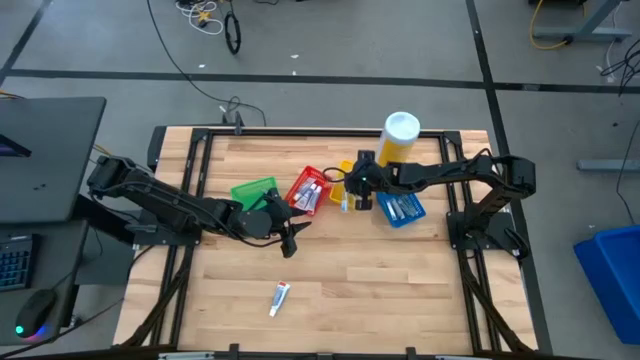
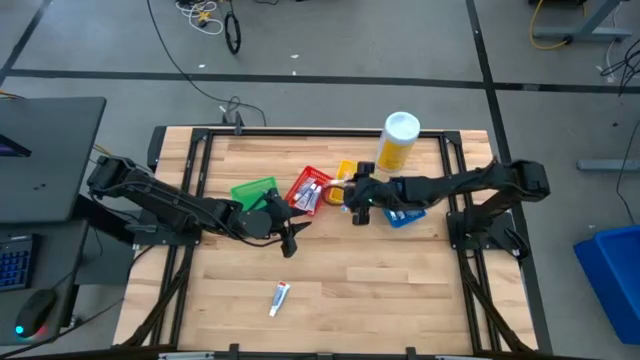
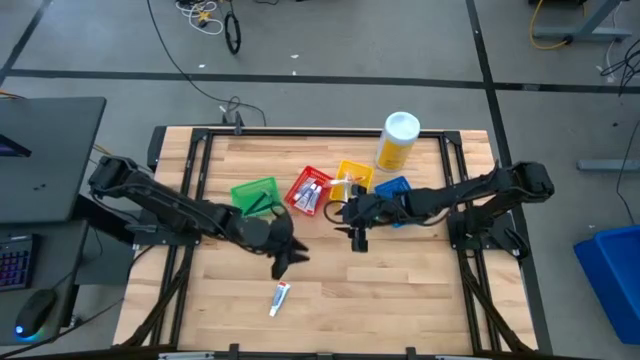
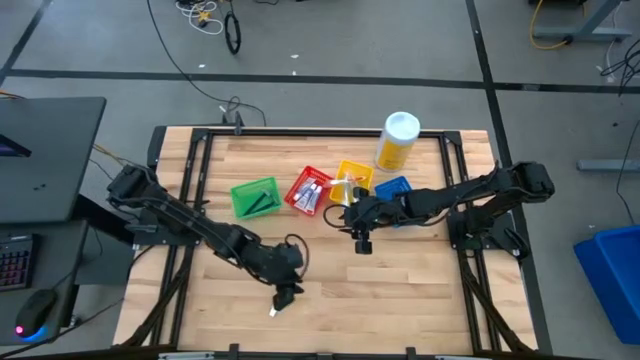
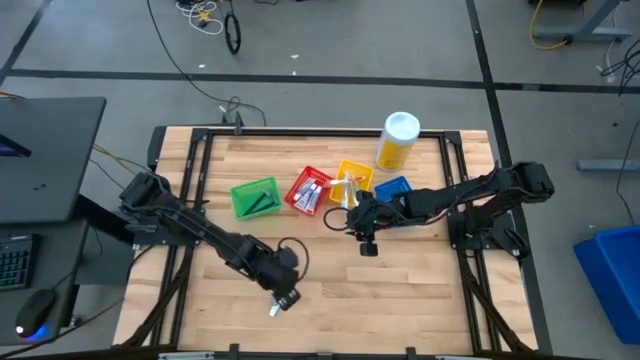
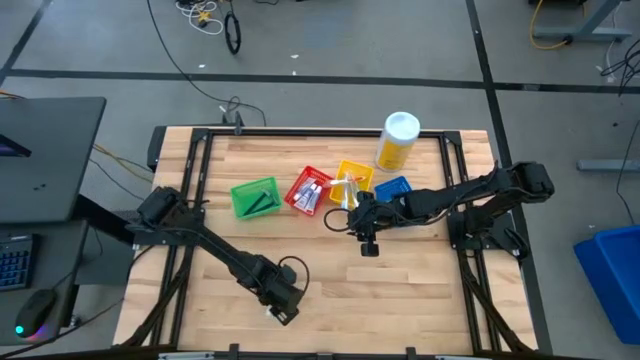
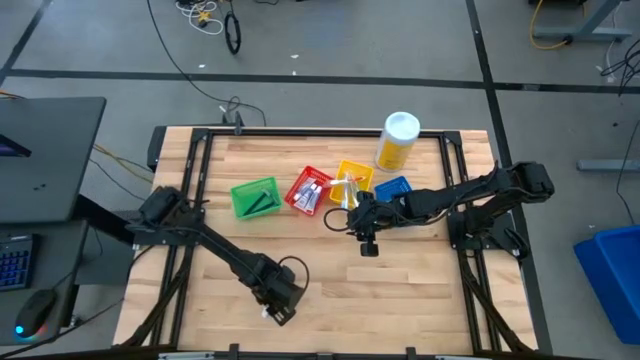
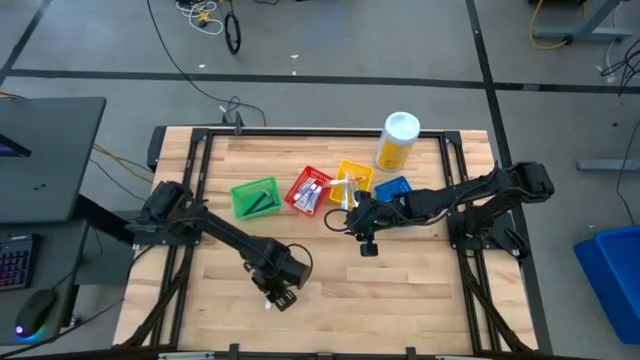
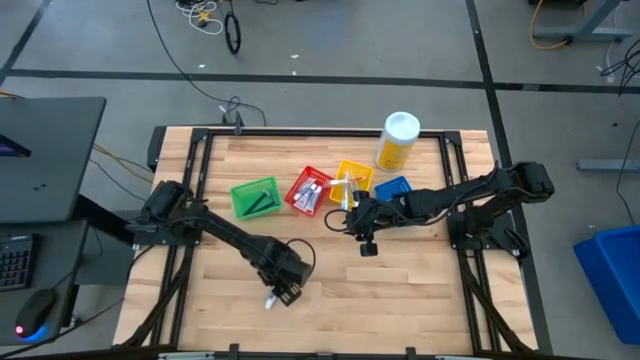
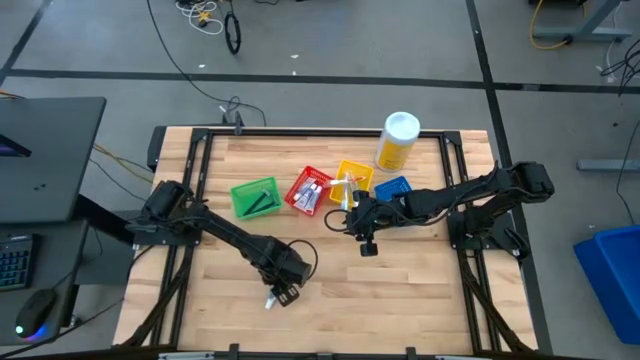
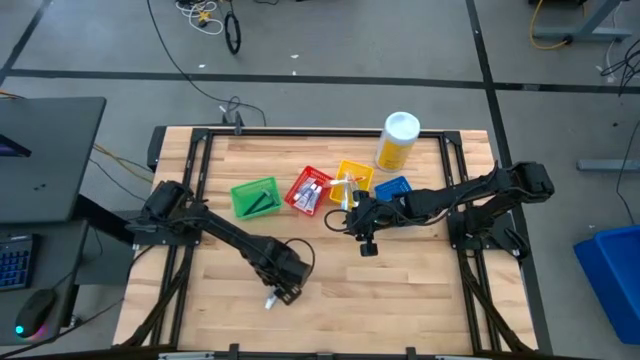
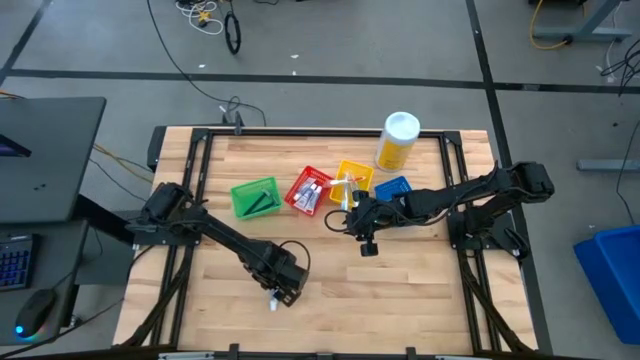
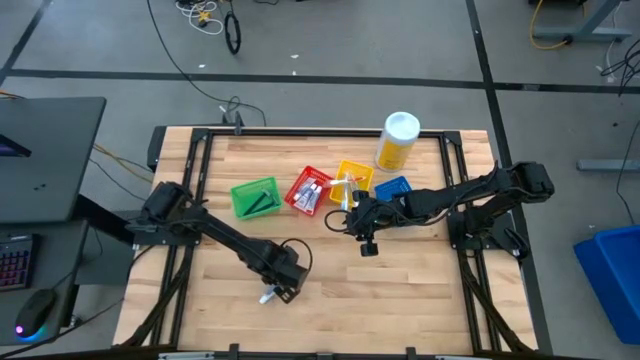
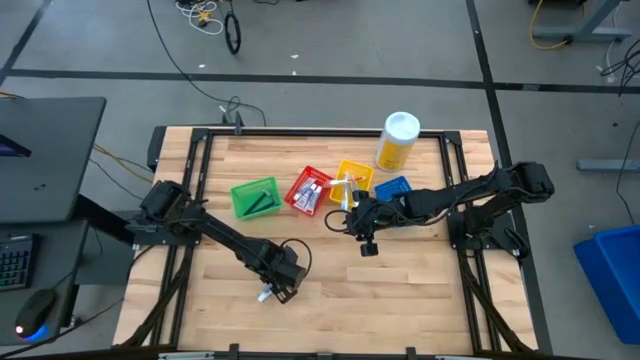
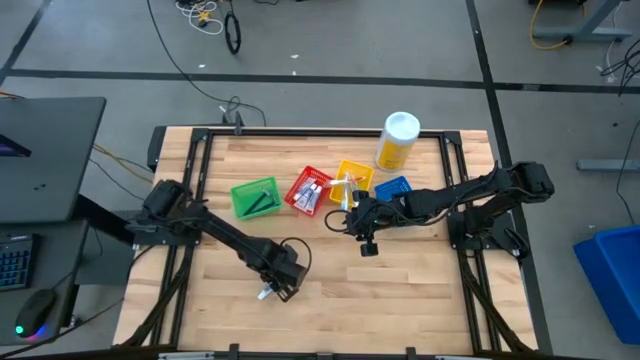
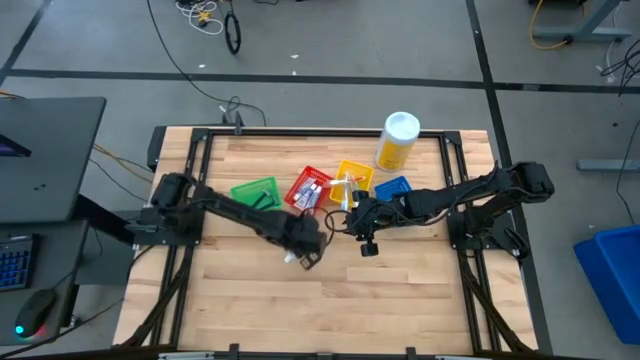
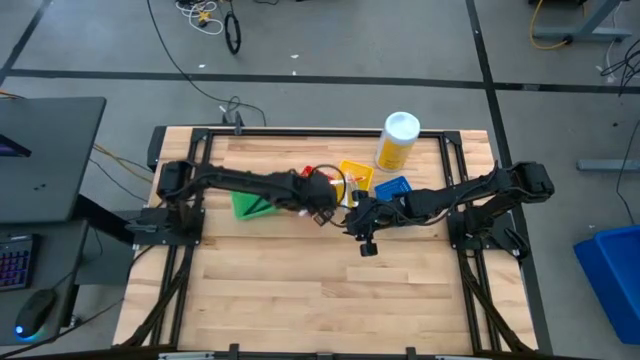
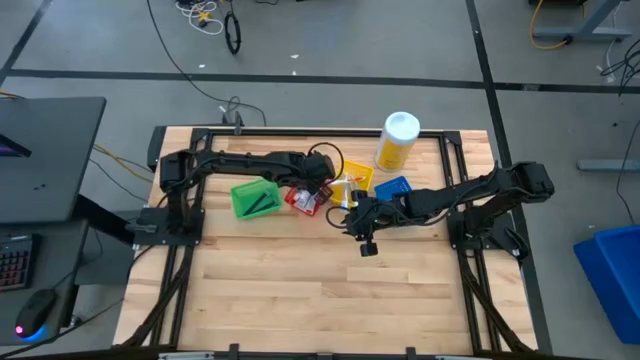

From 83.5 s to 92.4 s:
Task: Pick & Place Travel size toiletries
Put the white toothpaste into the red bin

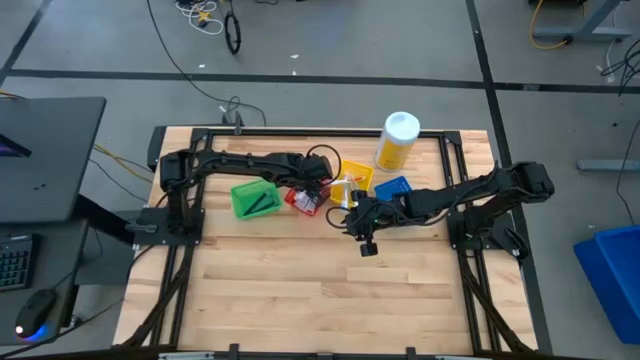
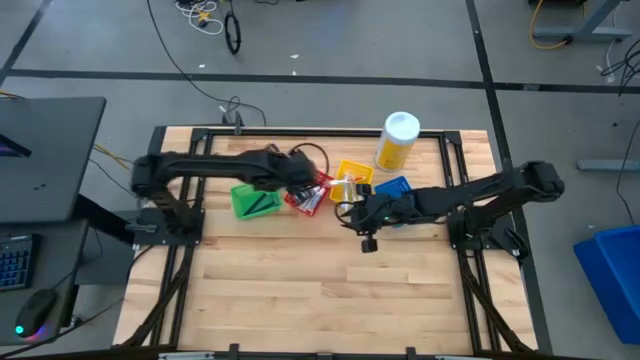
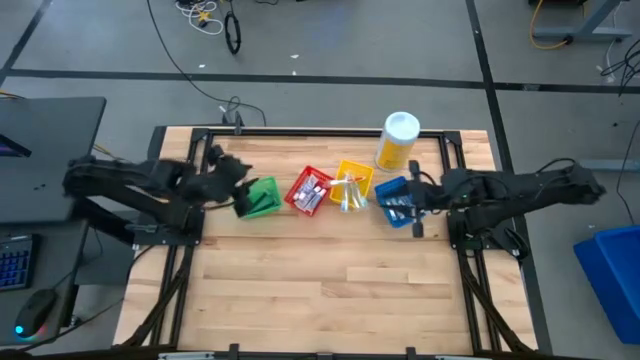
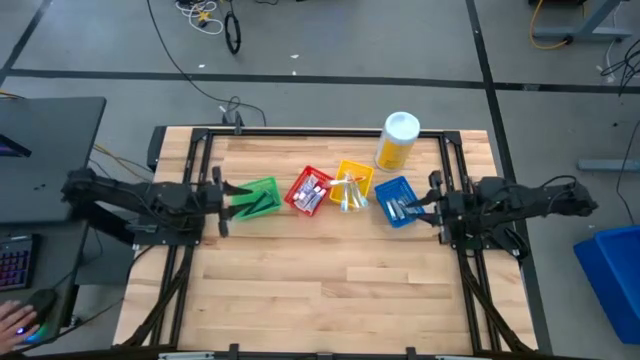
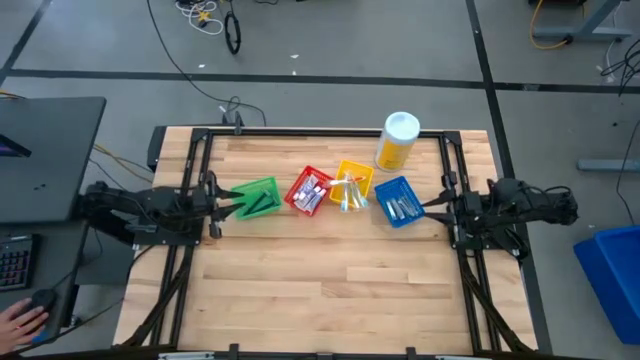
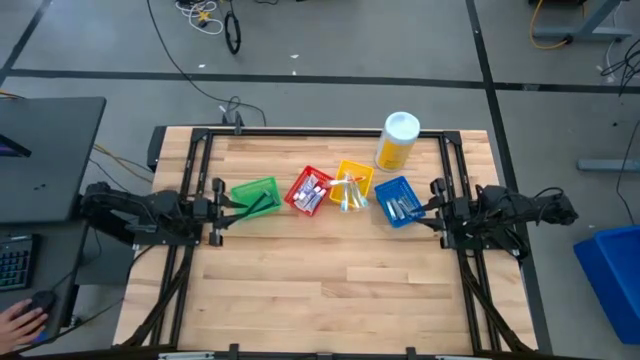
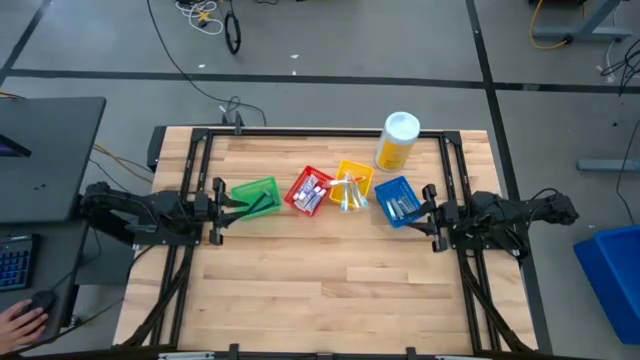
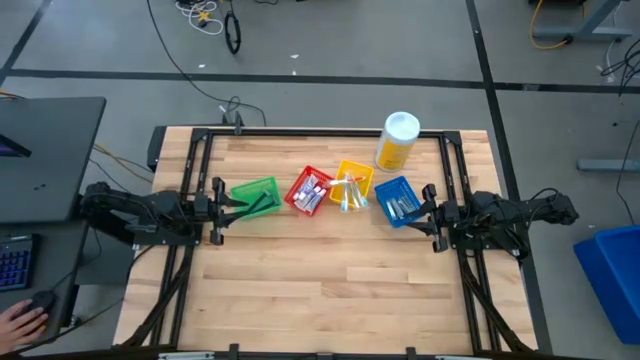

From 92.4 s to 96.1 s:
Return to Home Position

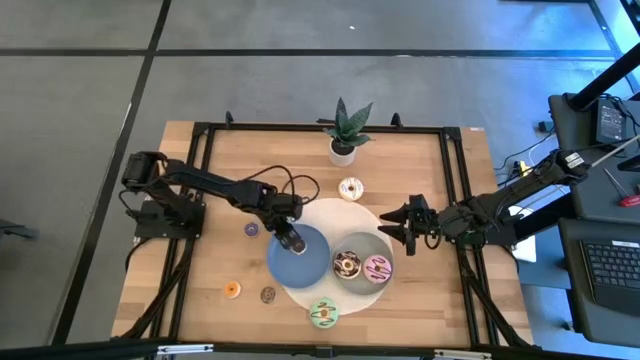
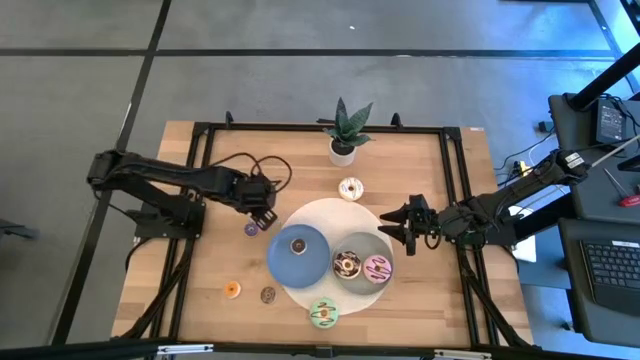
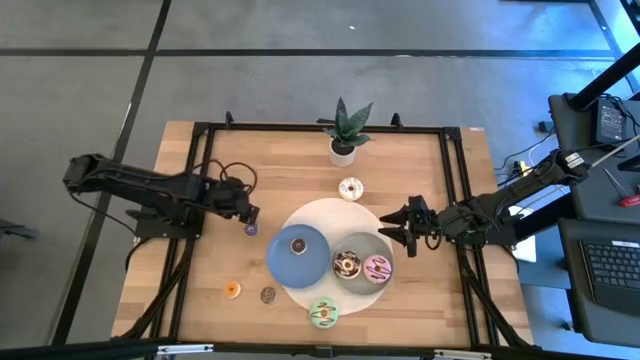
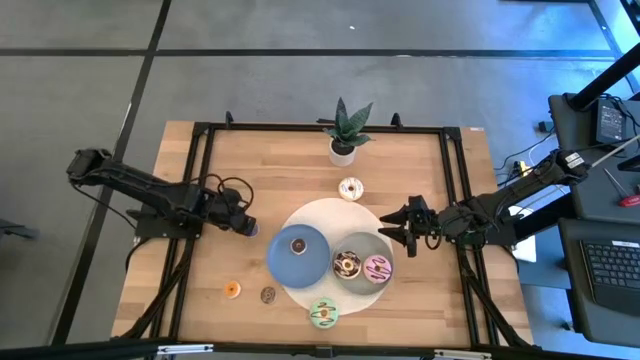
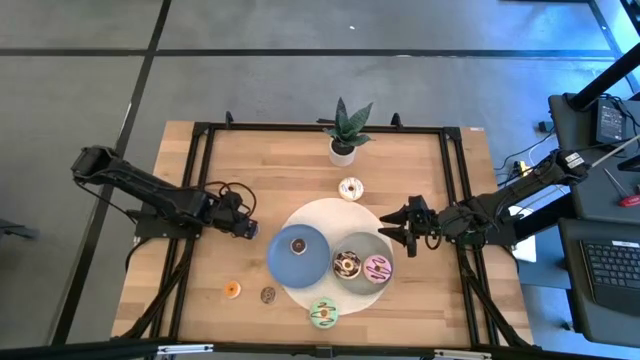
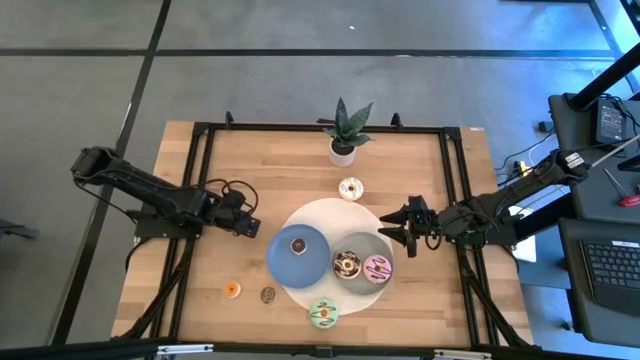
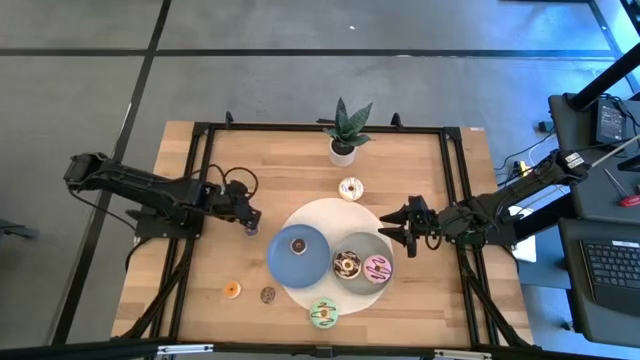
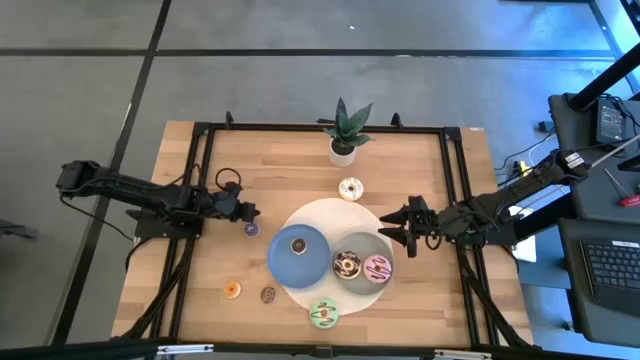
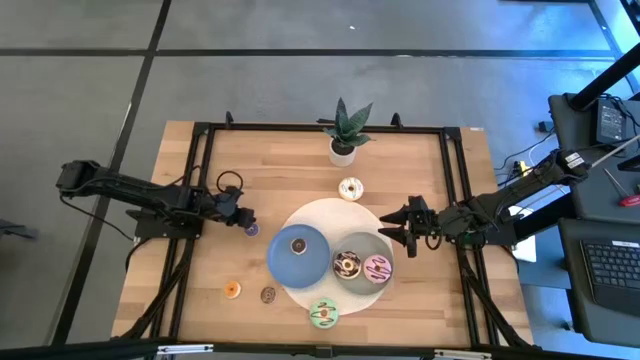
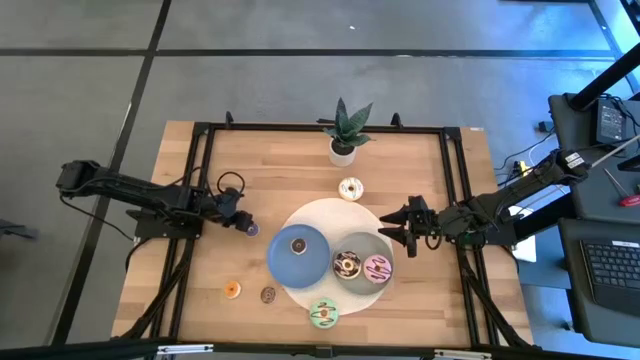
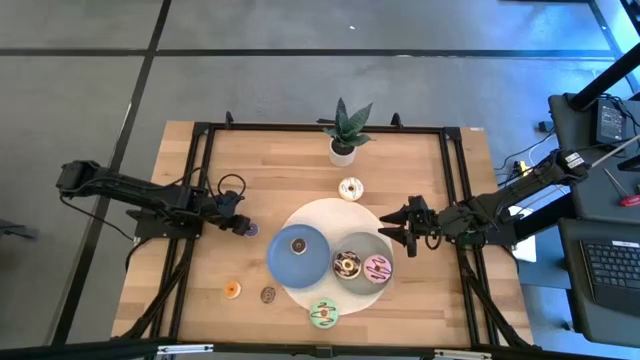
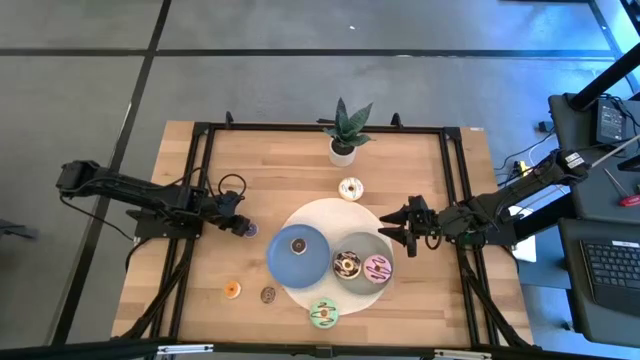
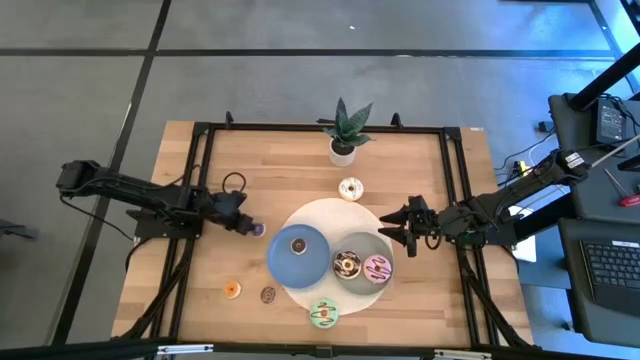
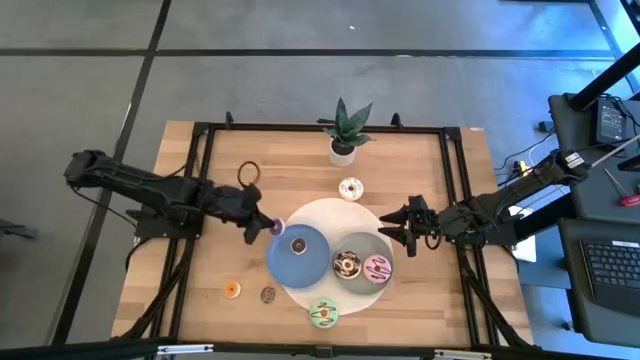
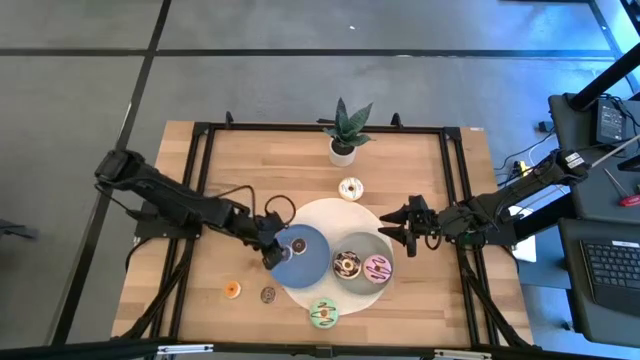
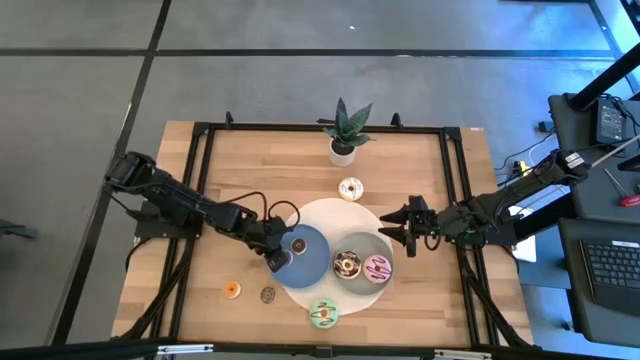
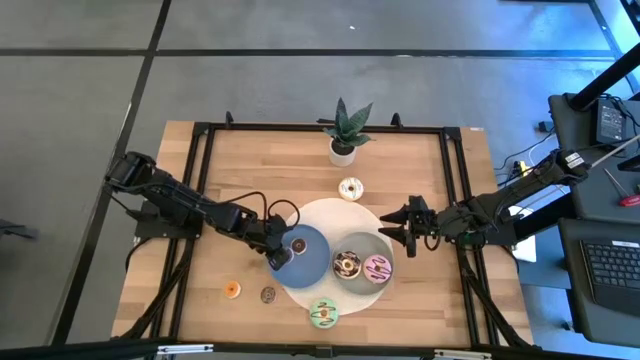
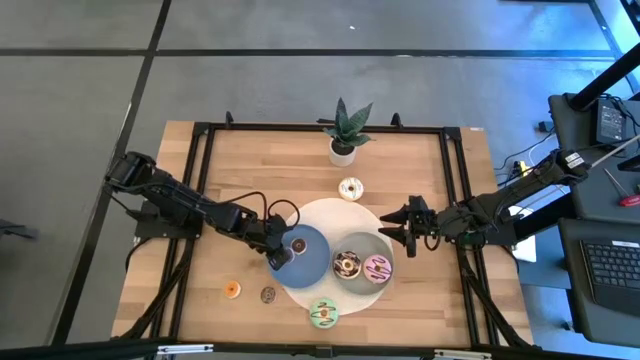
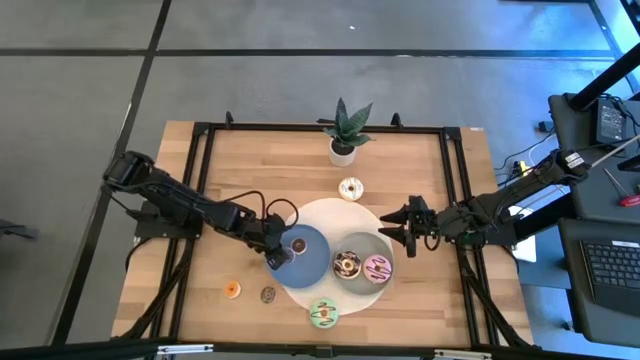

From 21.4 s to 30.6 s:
Task: Pick & Place donuts
Put the small violet donut on the blue plate
